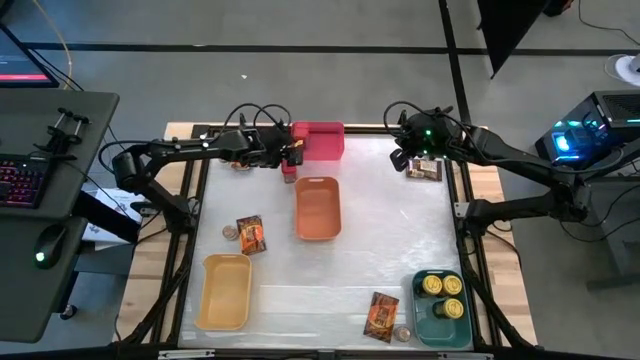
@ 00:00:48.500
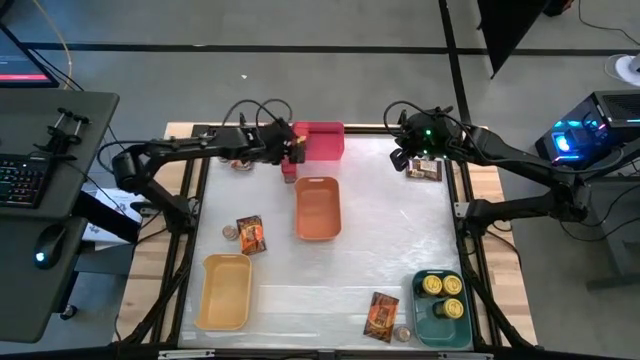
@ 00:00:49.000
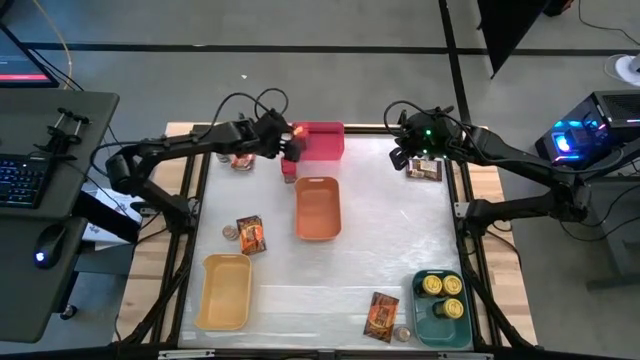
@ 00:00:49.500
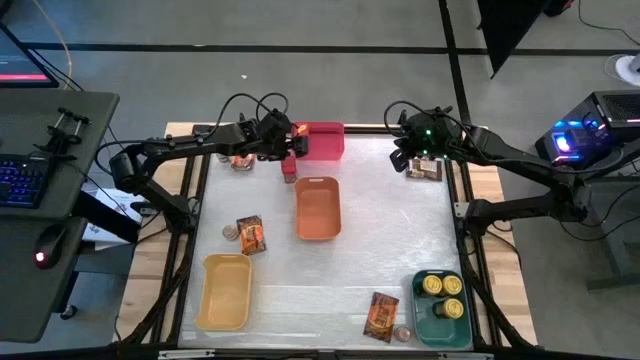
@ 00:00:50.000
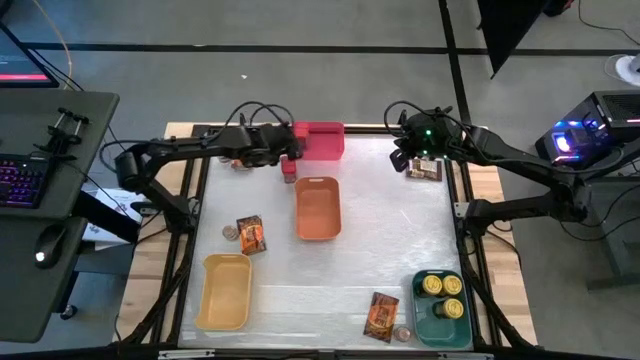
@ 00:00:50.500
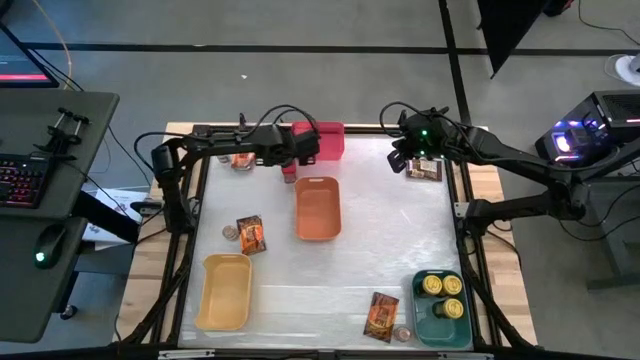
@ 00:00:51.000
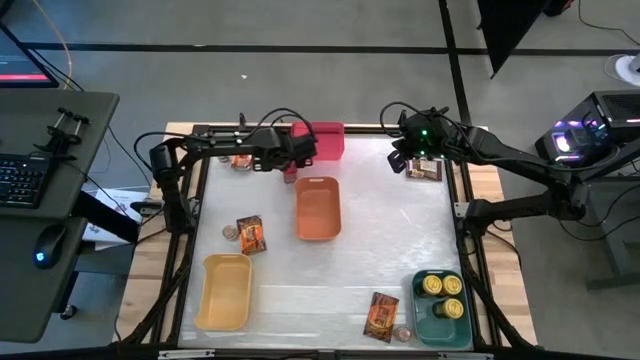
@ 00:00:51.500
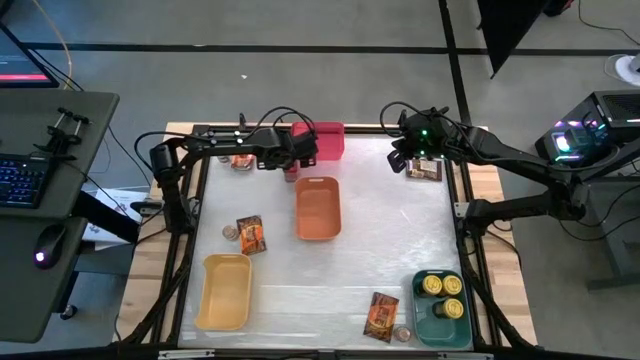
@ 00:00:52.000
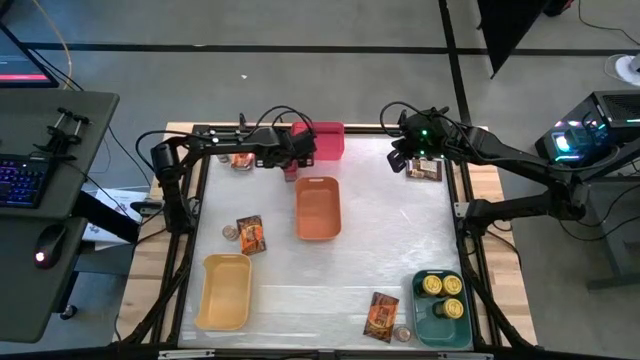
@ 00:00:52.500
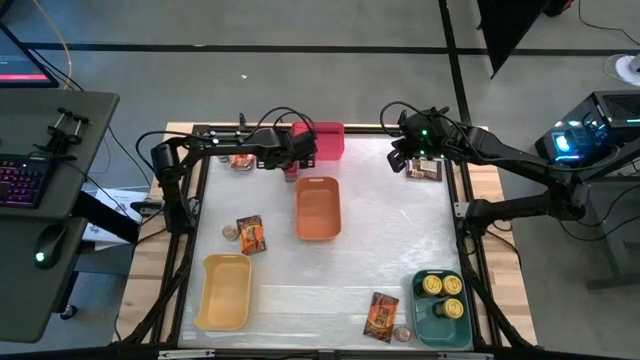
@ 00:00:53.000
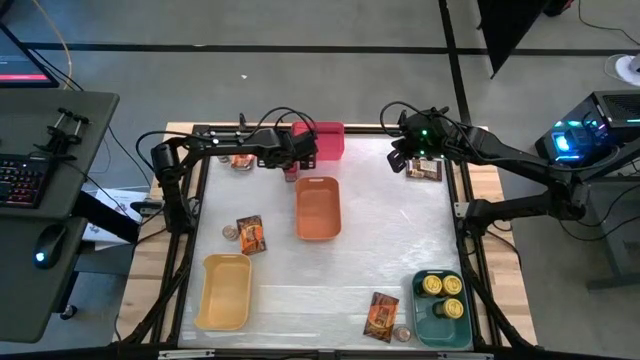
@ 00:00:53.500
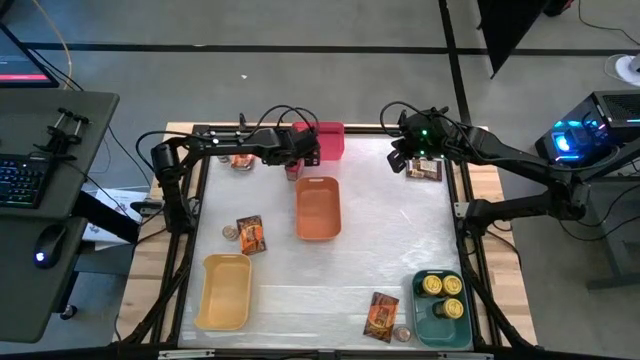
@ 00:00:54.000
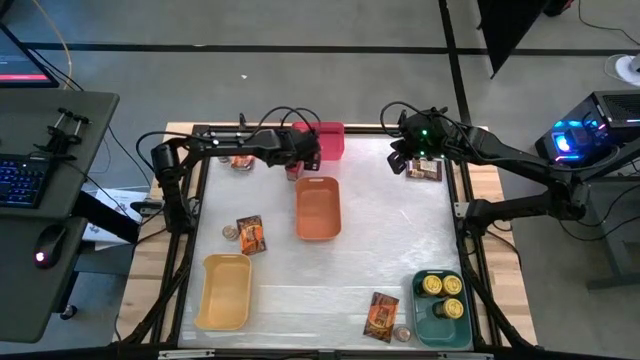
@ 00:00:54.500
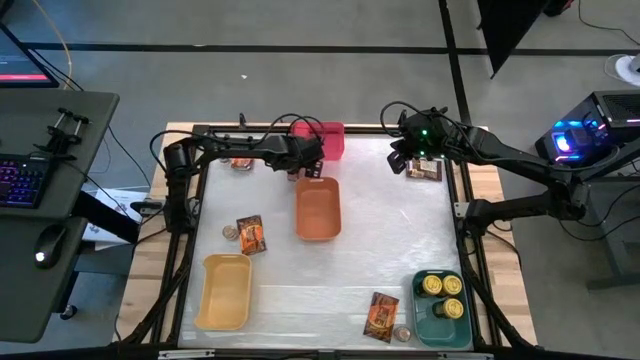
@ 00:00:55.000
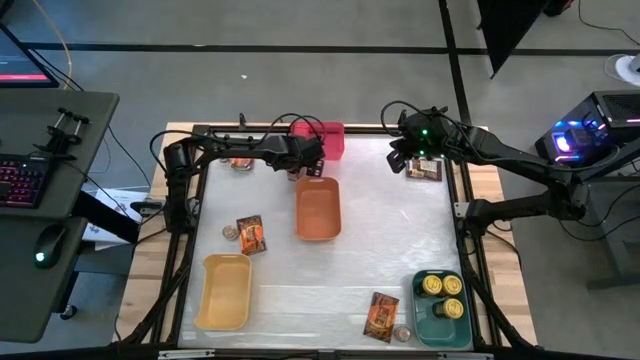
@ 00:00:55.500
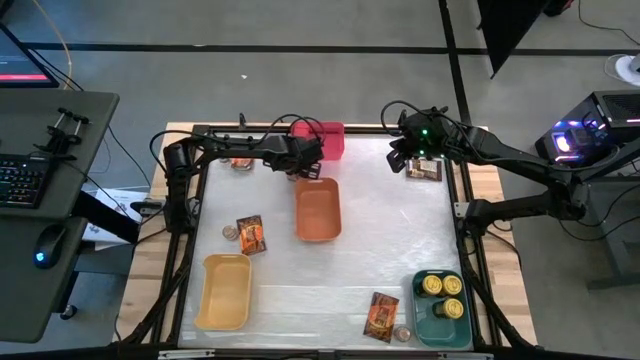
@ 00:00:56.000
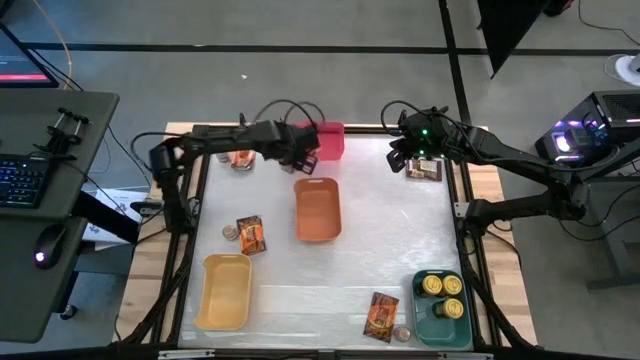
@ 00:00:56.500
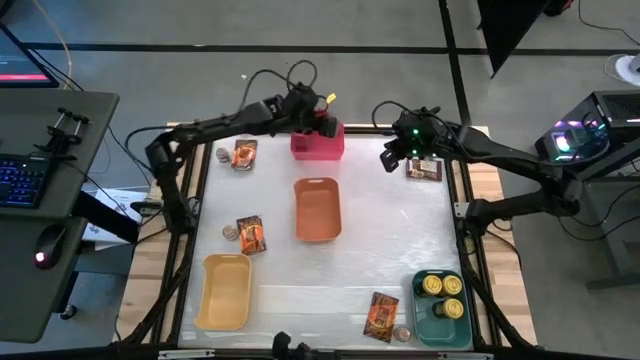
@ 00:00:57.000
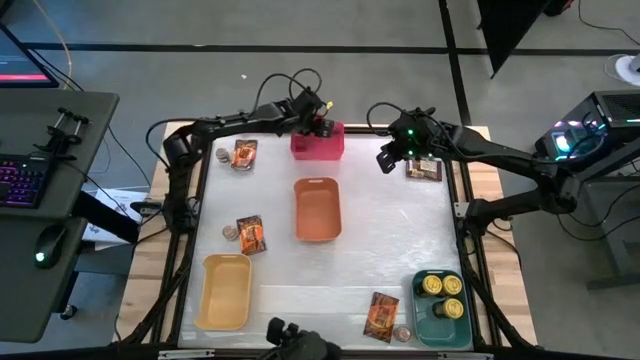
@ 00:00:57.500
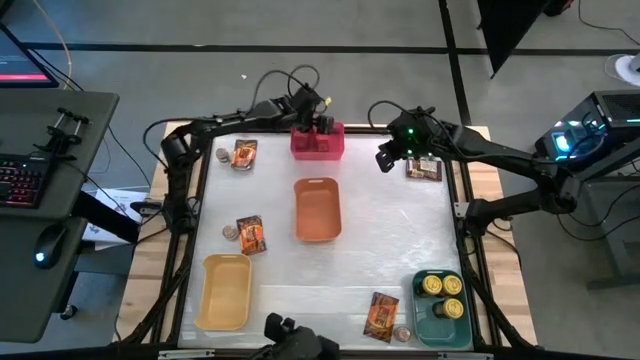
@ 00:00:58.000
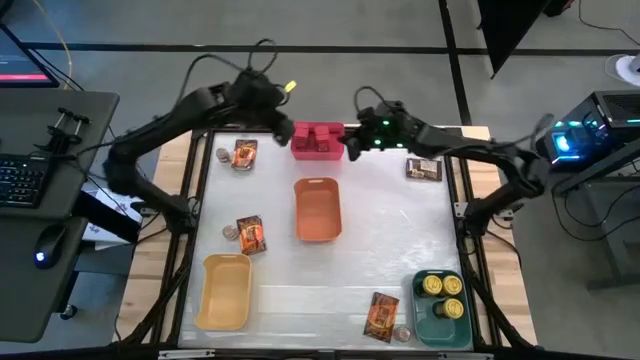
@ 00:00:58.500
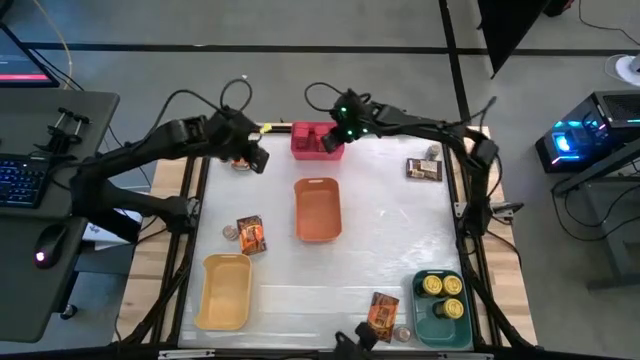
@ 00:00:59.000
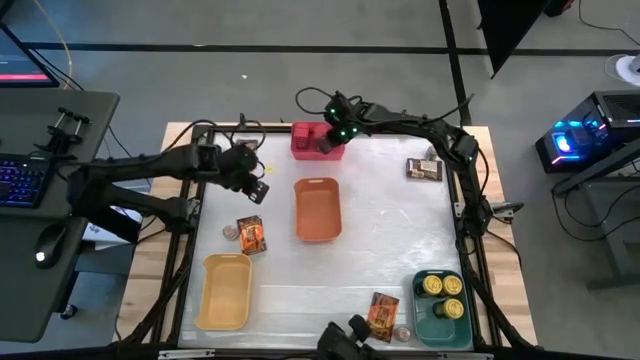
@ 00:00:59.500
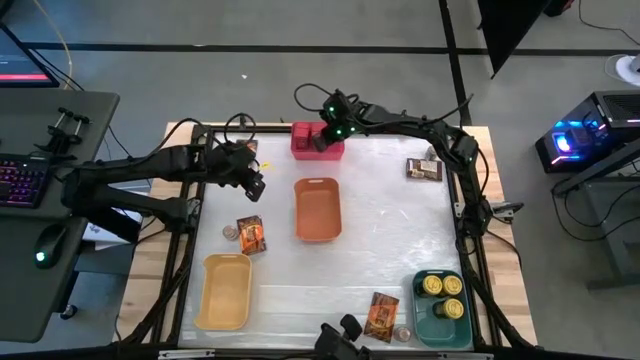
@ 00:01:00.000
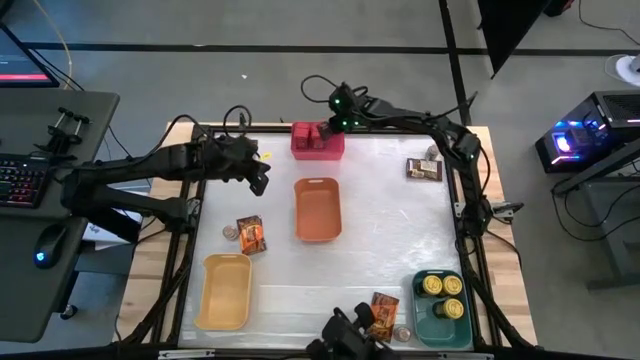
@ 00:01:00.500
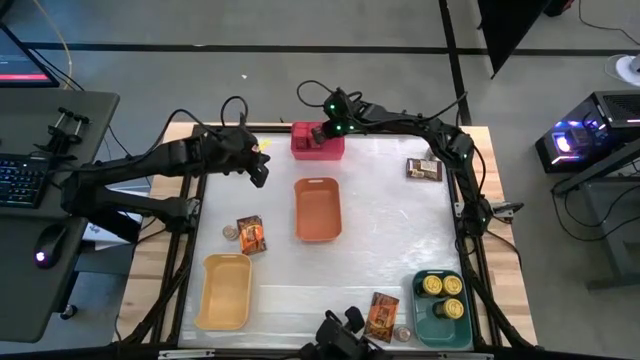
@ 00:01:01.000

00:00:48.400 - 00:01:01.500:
Task: Sort spices by type
Put the red spice can into the red bin

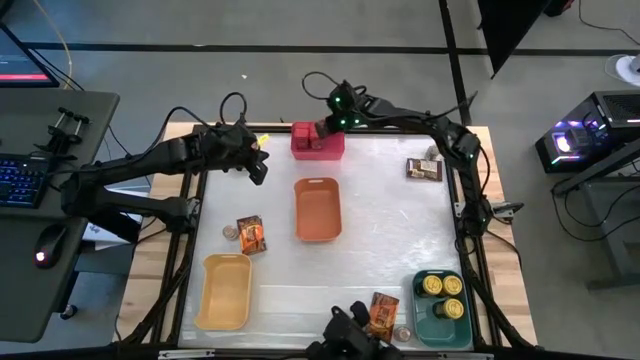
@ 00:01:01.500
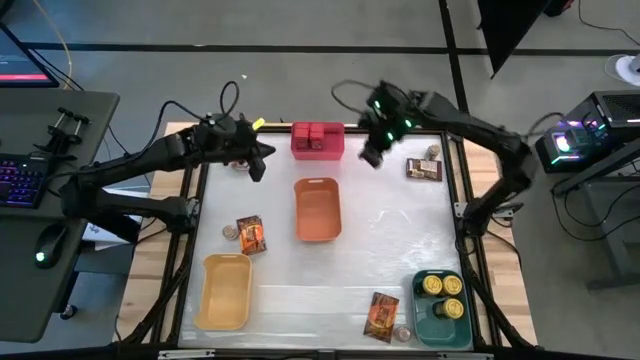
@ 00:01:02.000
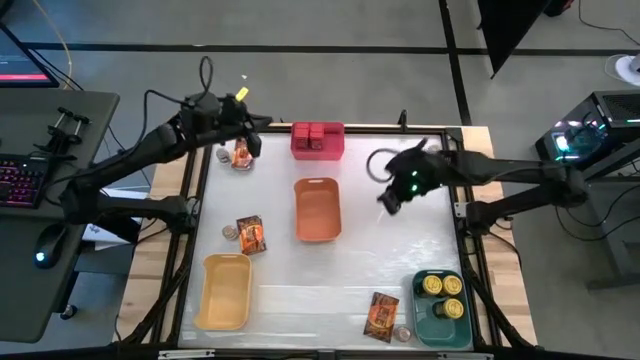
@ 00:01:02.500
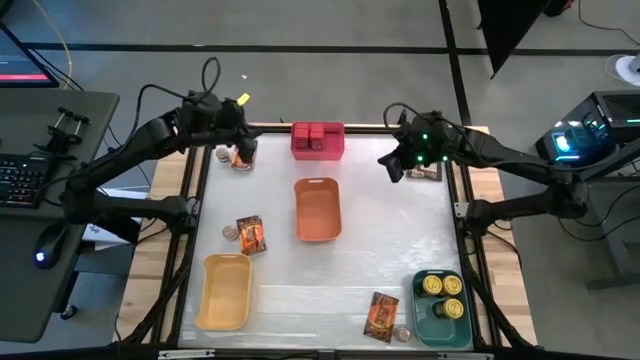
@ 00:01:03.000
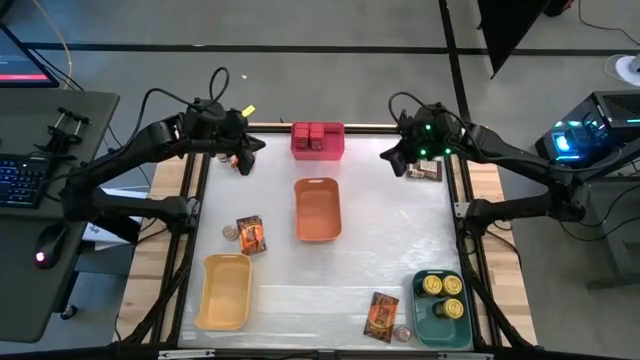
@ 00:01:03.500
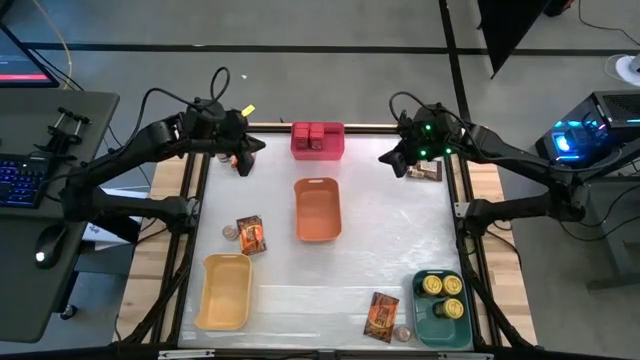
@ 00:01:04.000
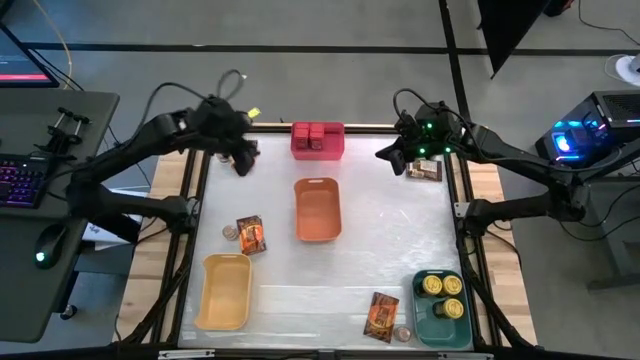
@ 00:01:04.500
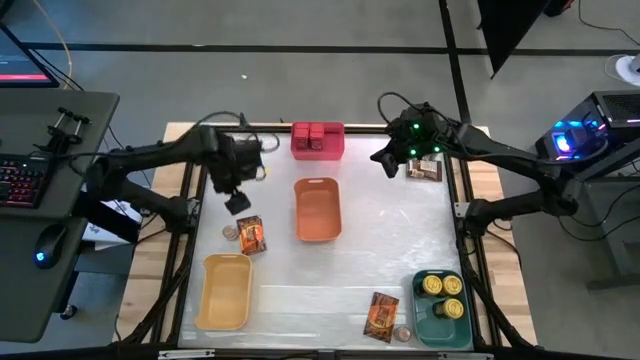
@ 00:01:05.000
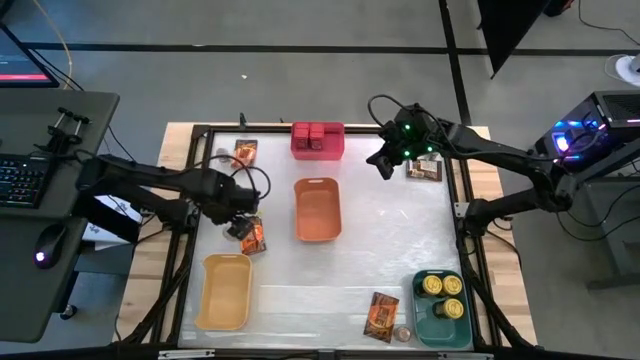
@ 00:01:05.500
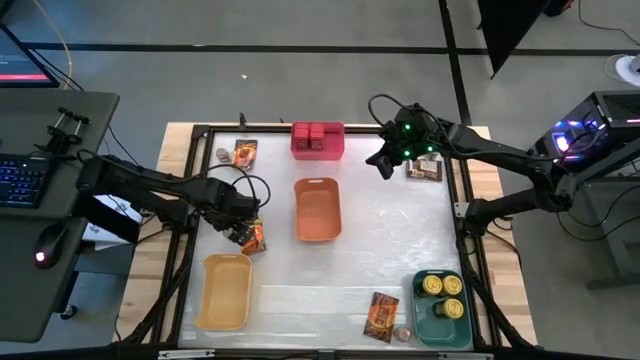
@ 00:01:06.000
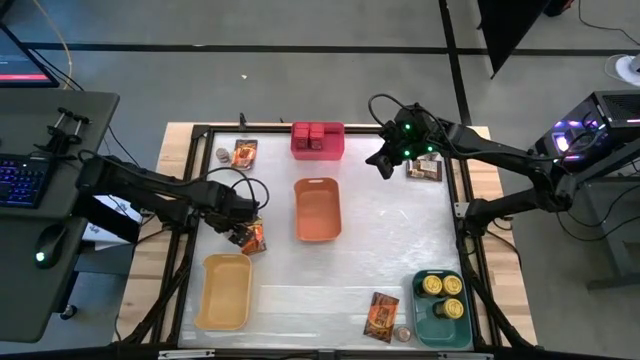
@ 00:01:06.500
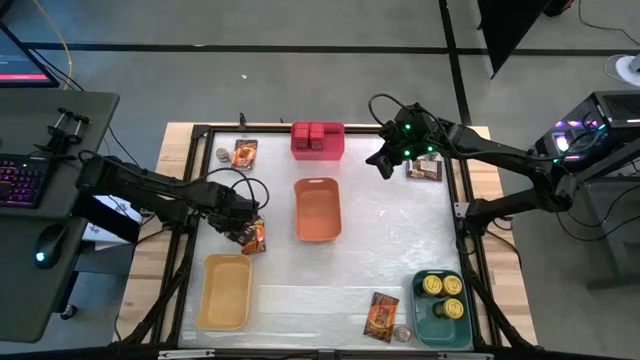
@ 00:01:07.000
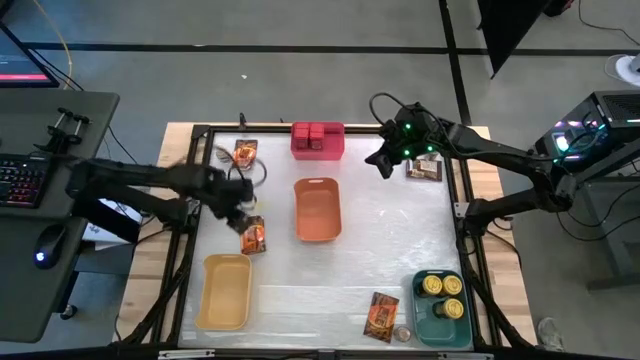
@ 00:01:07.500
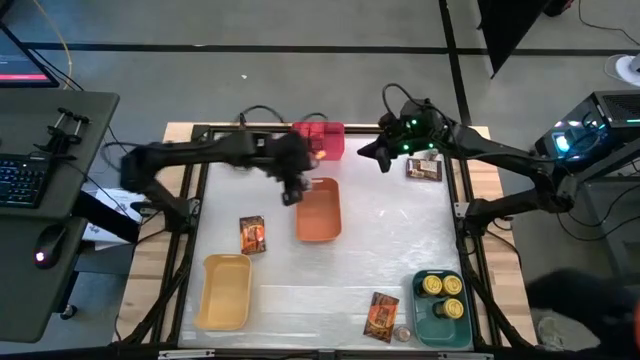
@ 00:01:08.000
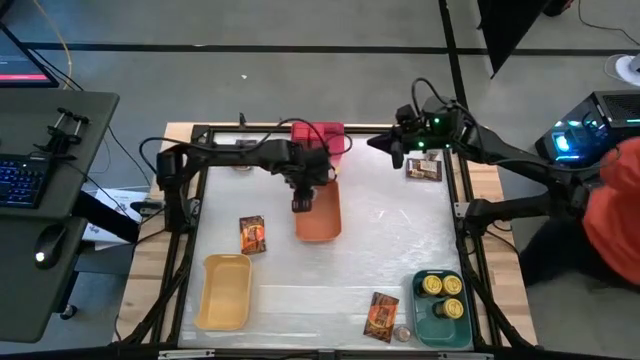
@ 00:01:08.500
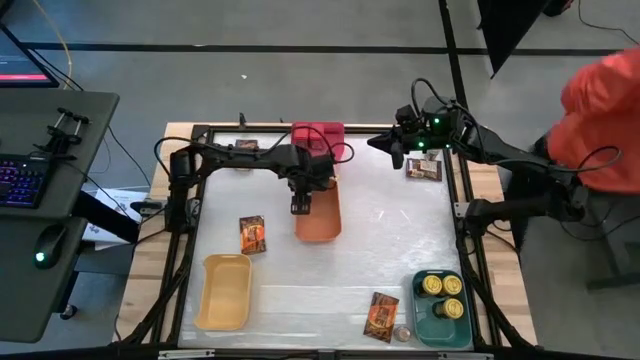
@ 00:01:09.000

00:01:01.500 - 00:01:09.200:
Put the middle left brown spice bottle into the orange bin
